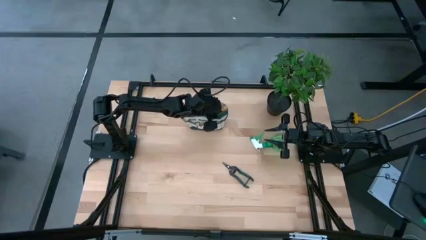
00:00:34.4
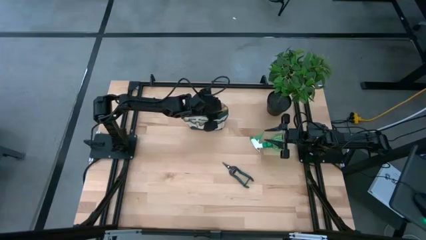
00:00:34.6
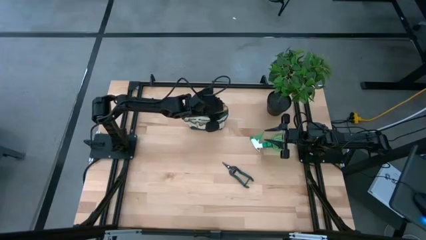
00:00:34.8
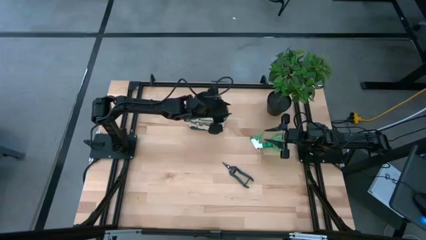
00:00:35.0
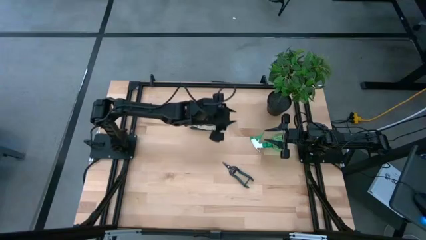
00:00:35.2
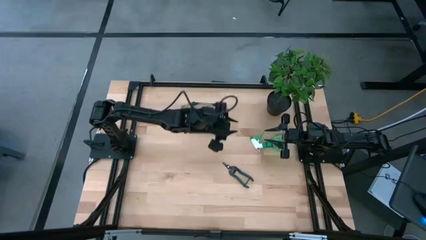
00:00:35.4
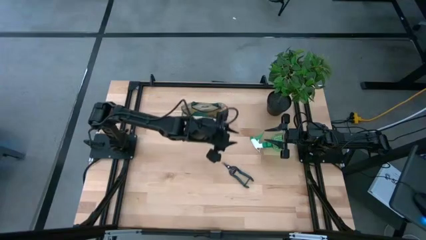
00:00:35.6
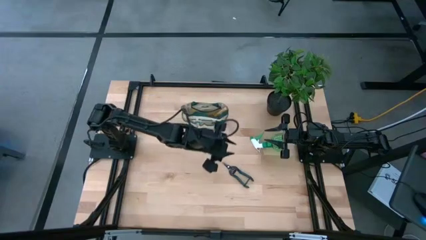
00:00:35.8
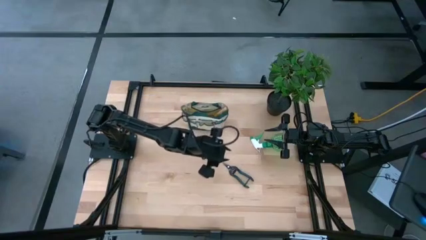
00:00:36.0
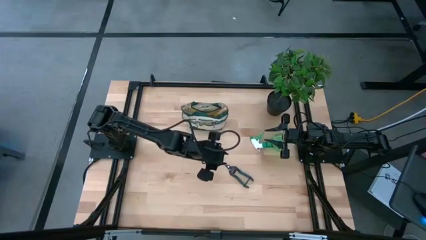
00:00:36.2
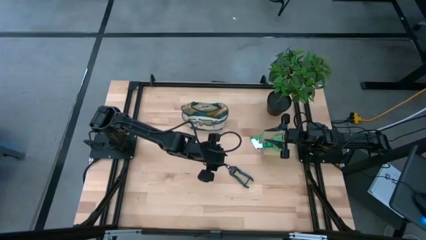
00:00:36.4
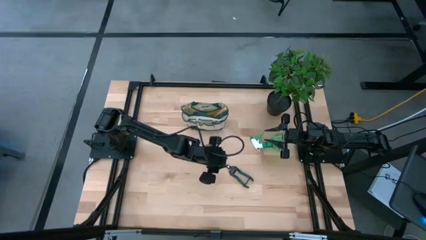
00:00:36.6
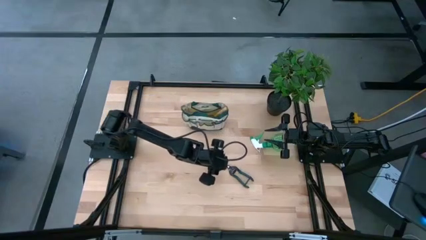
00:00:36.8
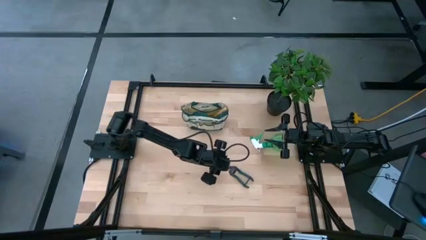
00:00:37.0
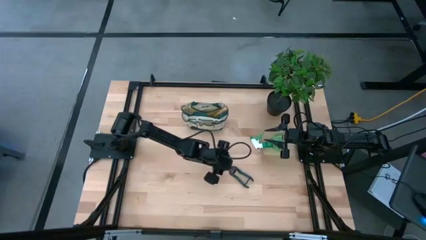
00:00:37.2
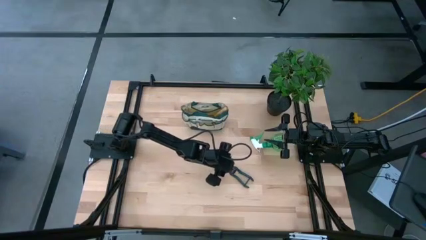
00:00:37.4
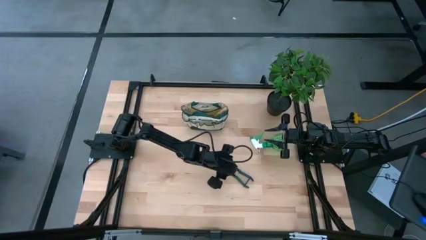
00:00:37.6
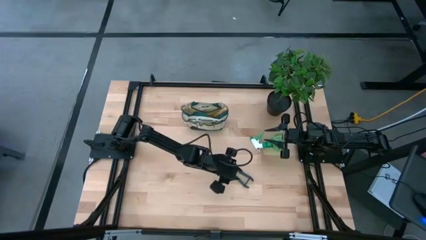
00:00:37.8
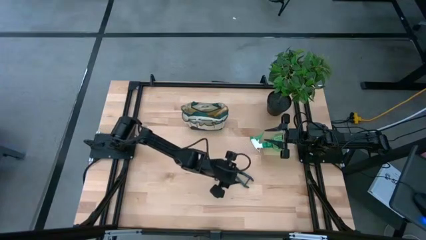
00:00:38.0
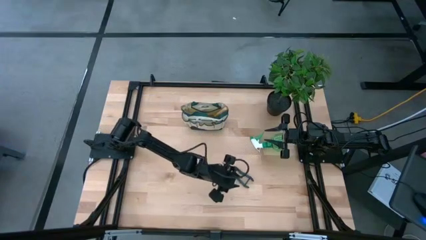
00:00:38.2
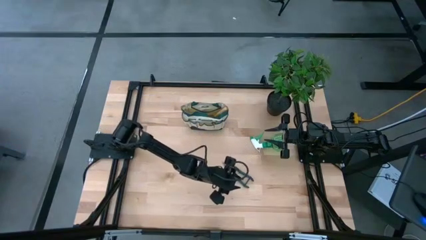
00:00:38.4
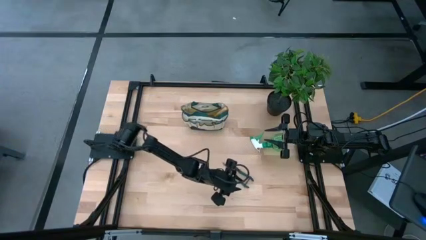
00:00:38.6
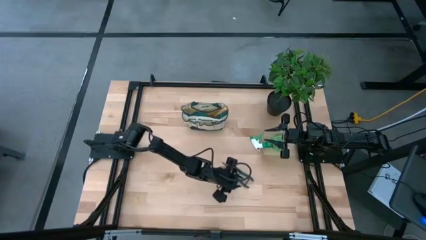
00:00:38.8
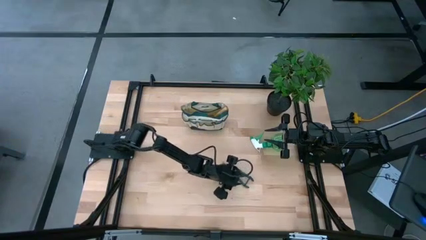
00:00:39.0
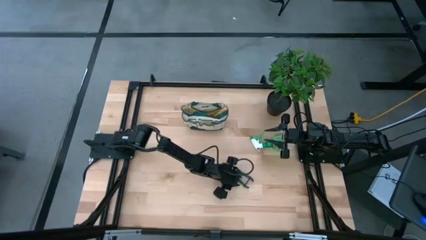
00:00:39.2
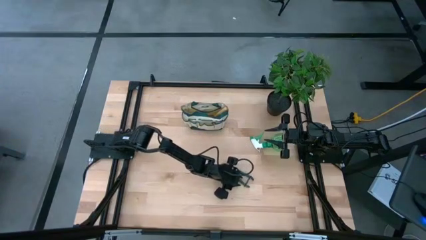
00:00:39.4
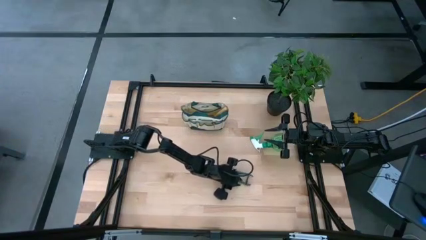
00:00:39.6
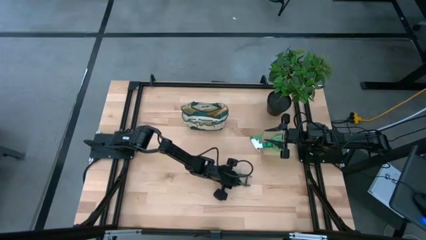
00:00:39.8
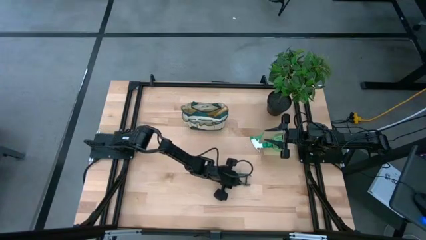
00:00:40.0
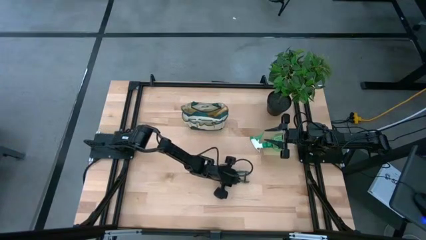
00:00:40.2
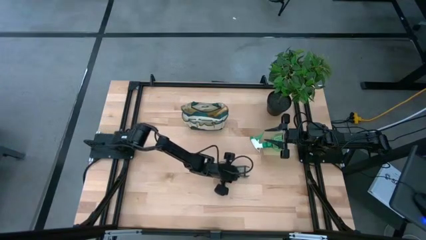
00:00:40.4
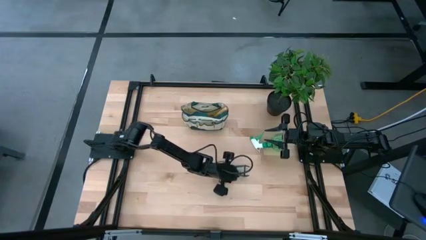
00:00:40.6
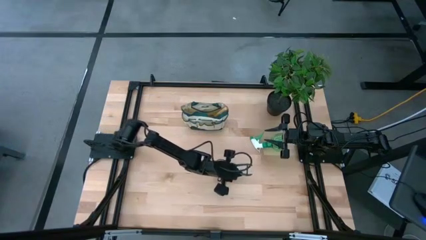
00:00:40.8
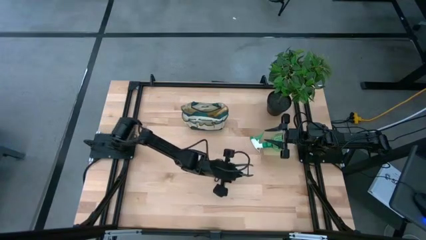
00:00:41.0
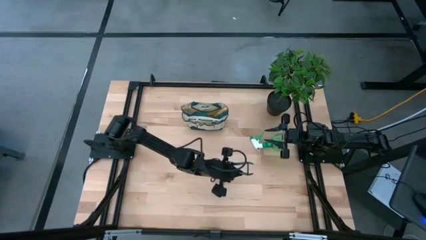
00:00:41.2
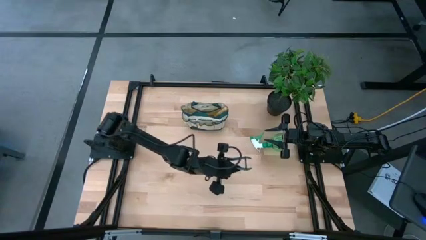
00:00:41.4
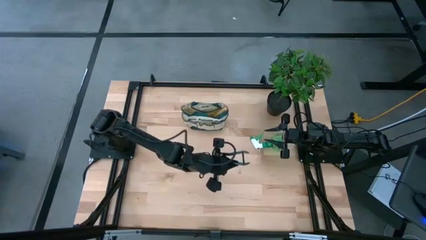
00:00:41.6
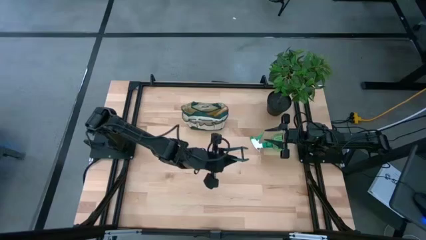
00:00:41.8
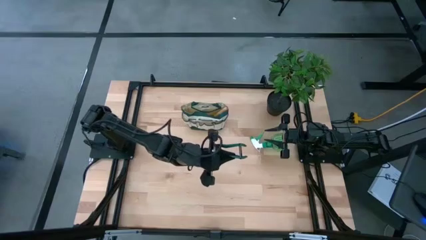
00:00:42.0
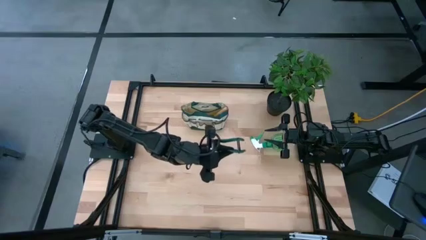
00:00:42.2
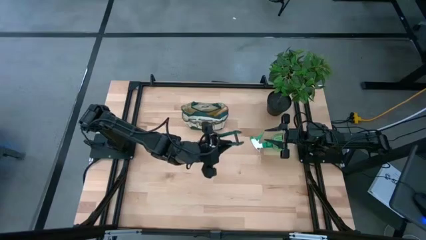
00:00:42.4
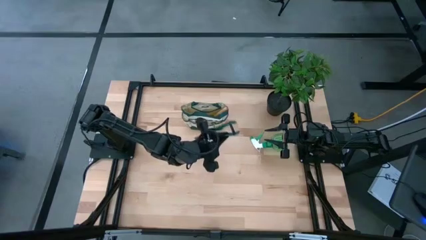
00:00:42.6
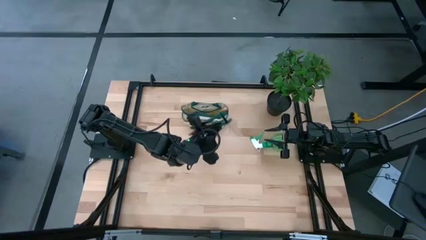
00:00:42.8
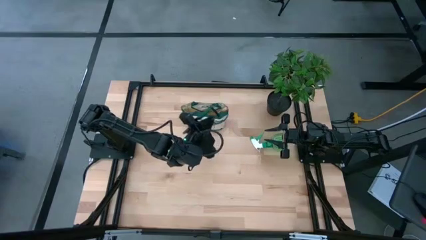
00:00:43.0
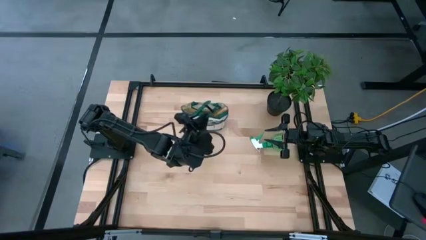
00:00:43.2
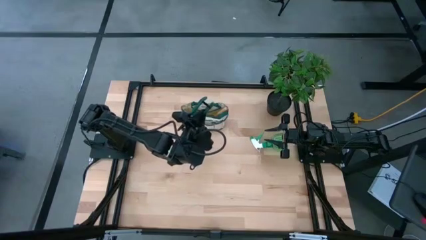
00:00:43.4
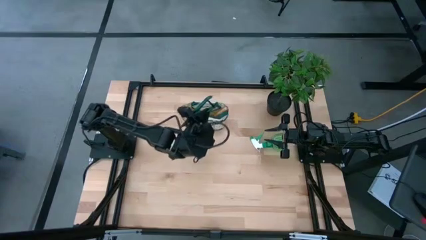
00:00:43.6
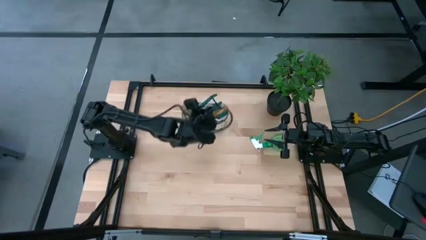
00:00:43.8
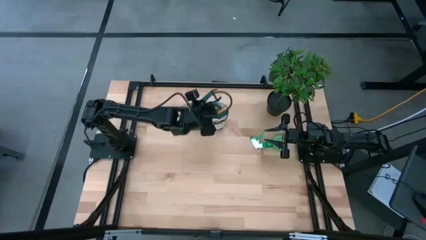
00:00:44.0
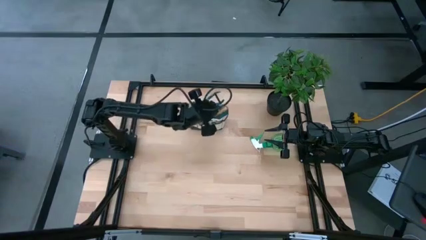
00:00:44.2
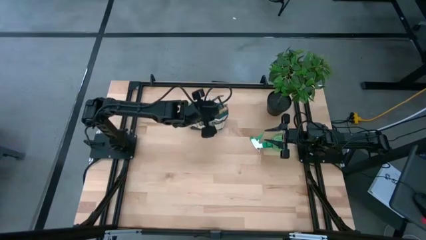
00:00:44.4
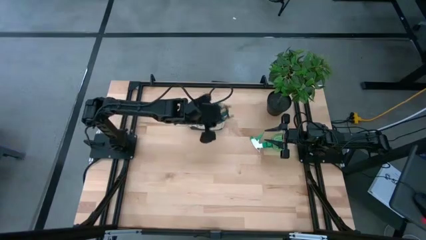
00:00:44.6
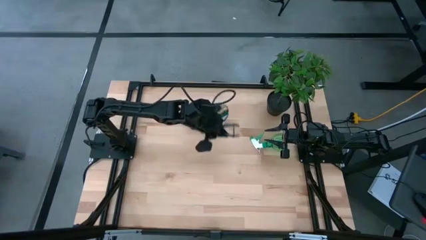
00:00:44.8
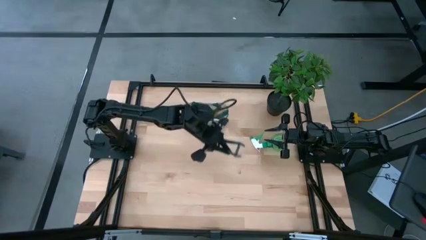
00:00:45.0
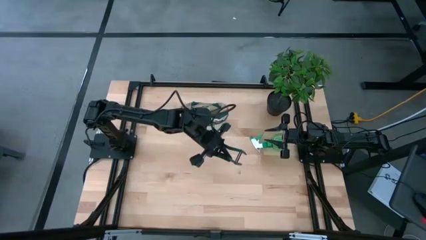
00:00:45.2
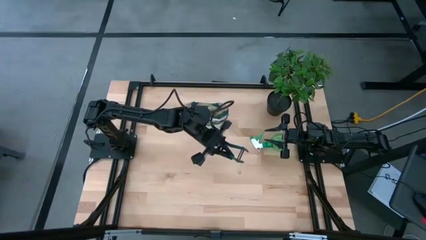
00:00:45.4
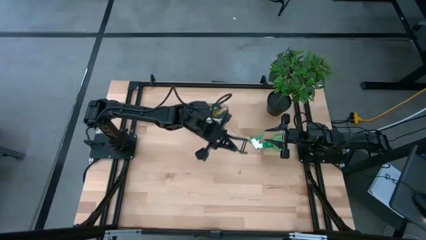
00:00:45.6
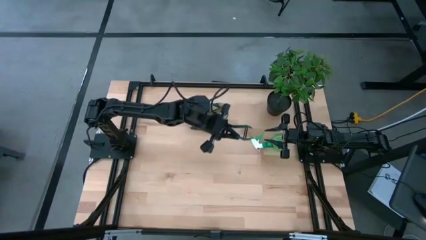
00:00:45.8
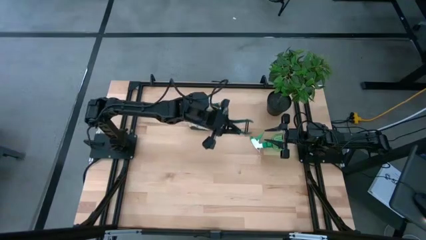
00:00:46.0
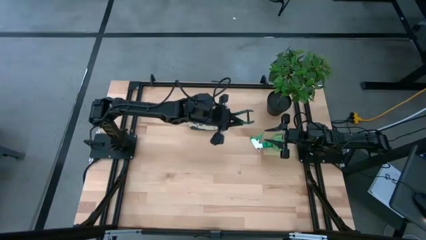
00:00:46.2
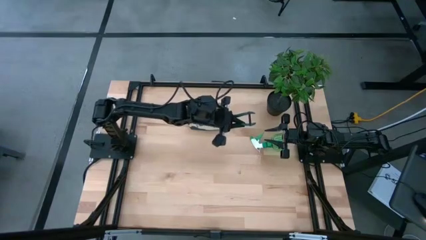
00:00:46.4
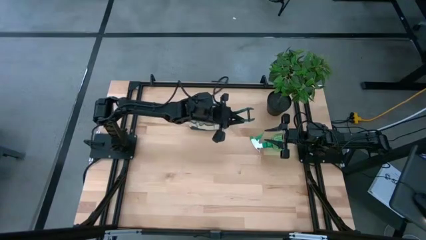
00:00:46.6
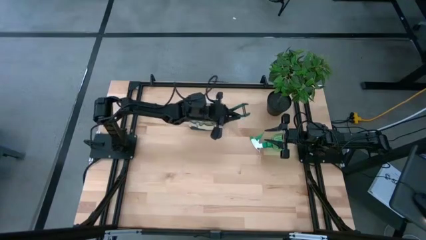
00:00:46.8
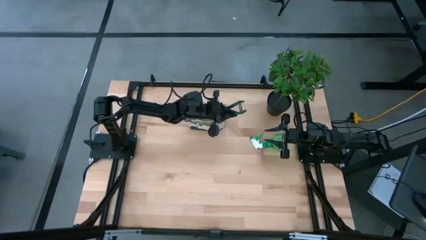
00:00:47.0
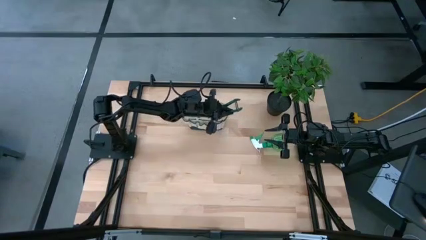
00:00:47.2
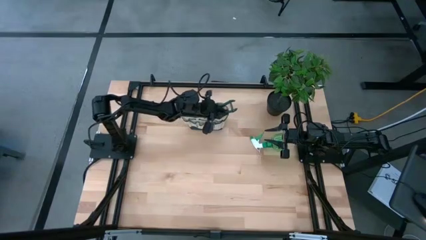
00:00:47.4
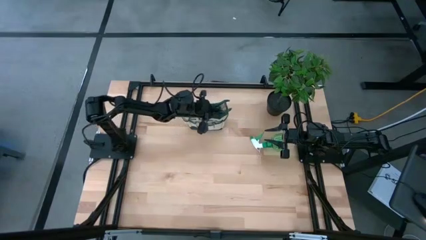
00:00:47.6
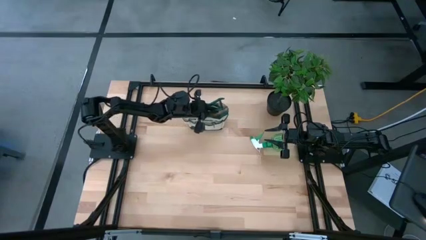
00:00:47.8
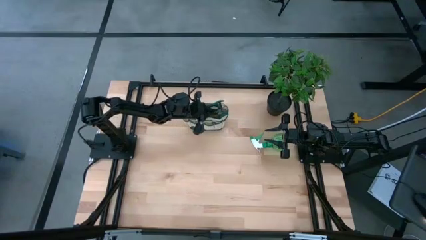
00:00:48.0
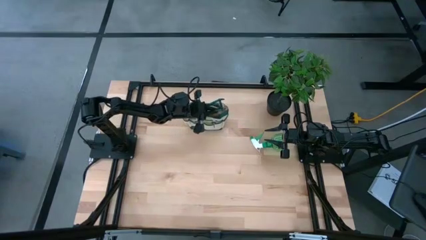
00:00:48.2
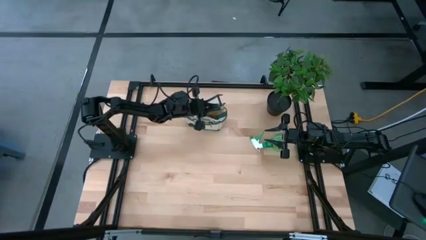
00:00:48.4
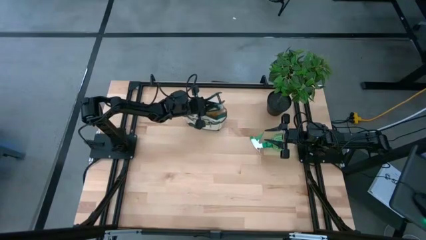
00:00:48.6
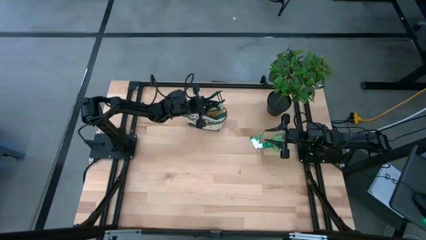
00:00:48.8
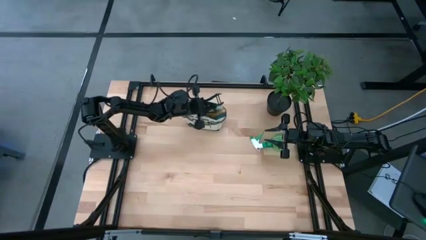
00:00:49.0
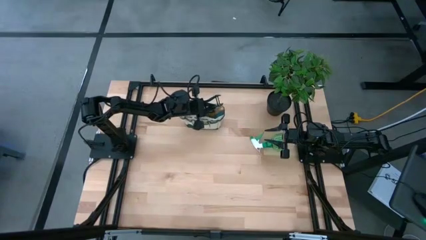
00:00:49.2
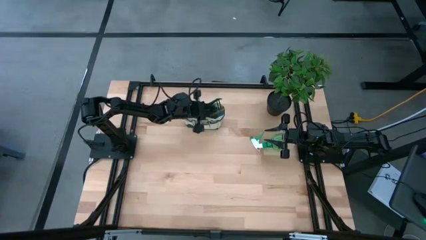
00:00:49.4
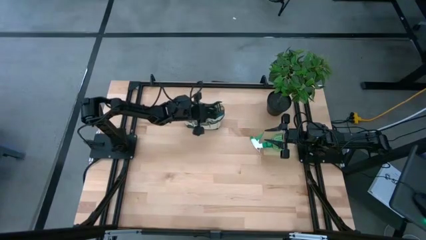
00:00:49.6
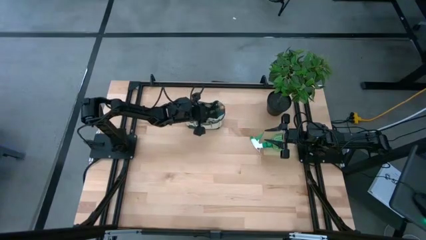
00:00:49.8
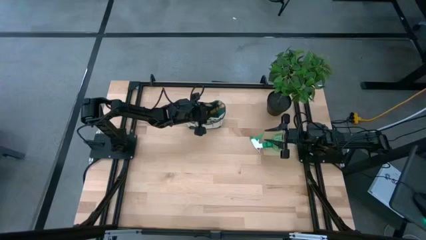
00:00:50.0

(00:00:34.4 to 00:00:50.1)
Task: Pick & Place Garden tools in Gardening bag
Put the green shear scissors into the light brown gardening bag
